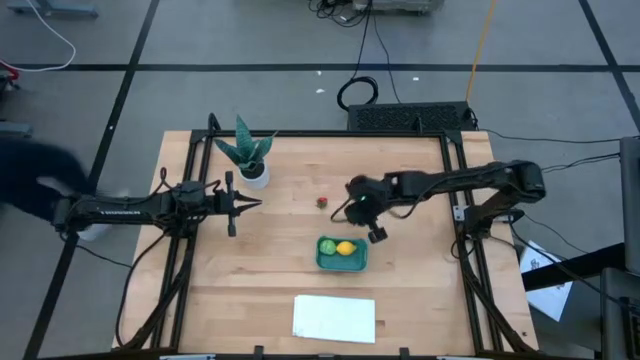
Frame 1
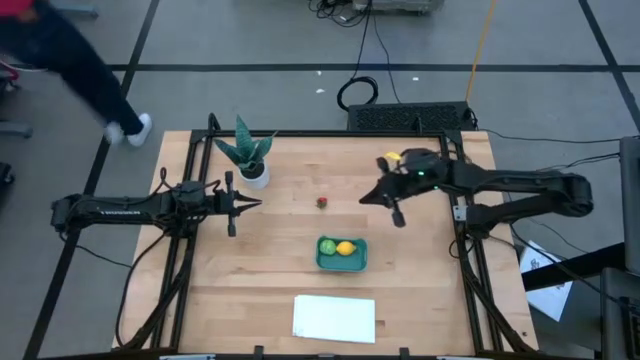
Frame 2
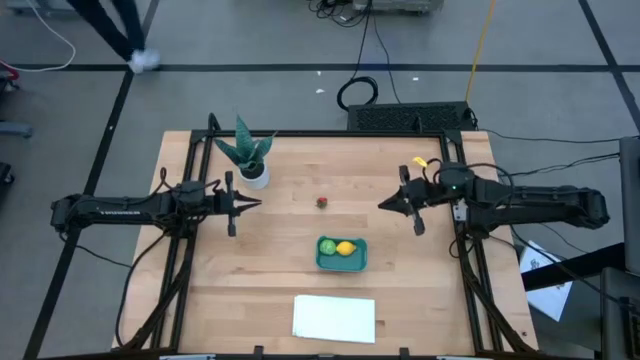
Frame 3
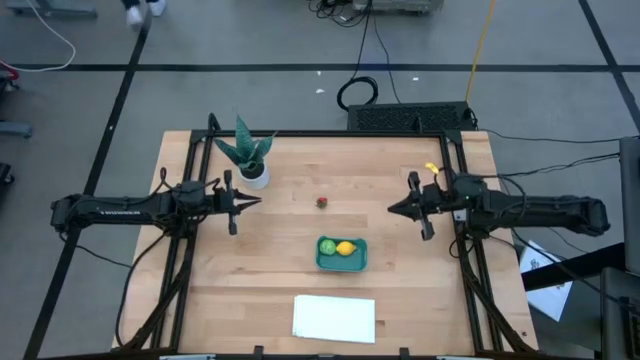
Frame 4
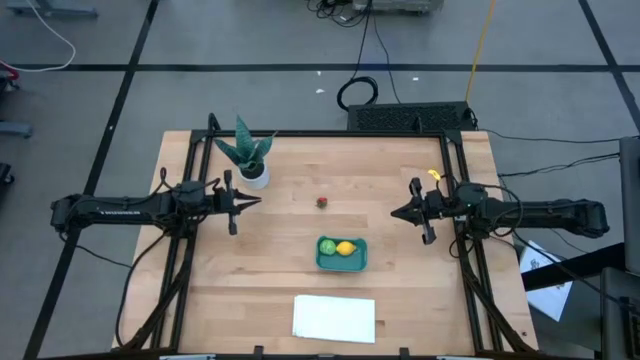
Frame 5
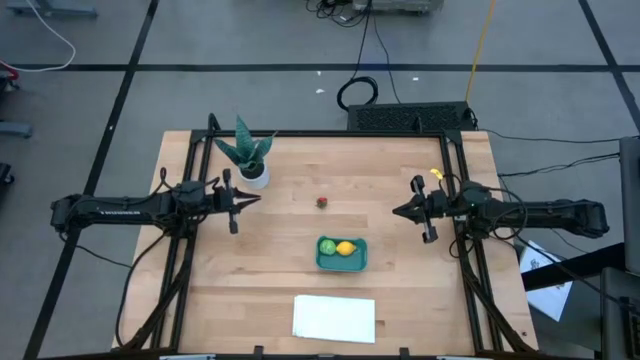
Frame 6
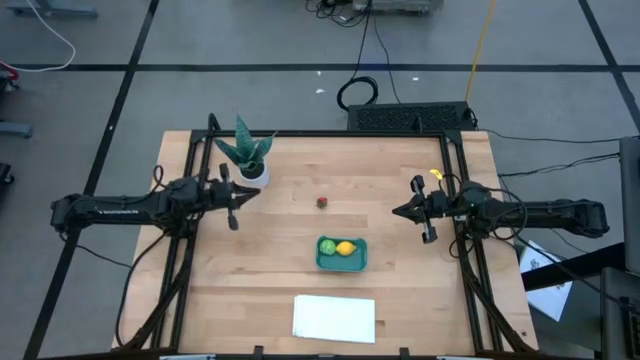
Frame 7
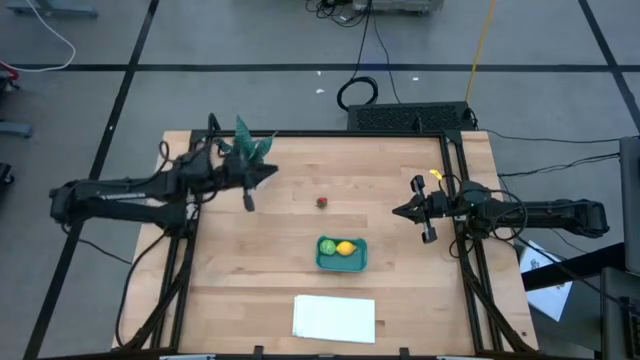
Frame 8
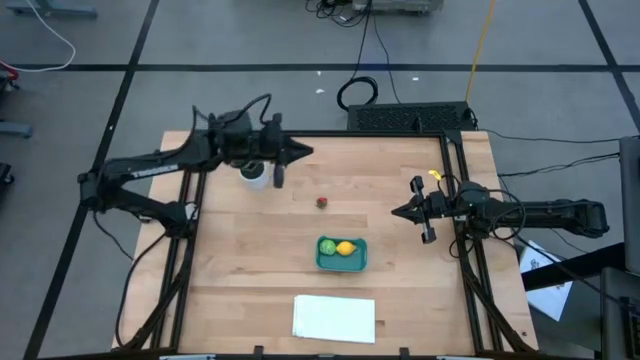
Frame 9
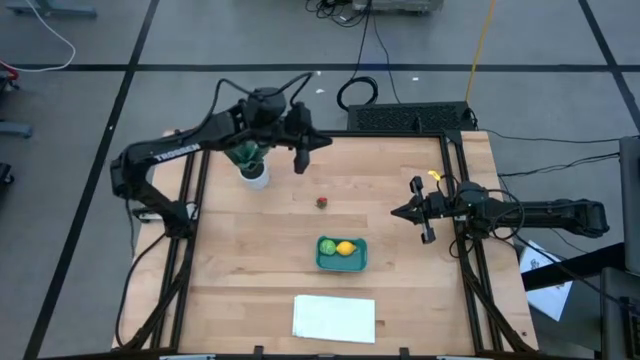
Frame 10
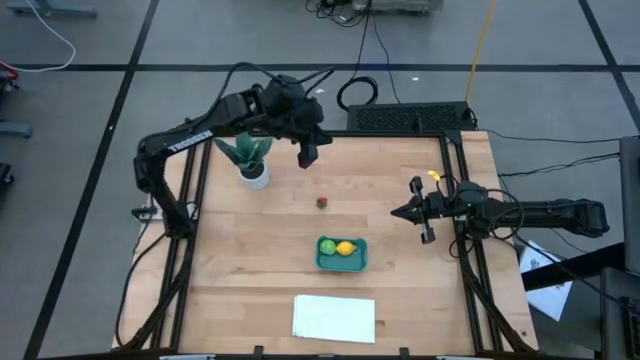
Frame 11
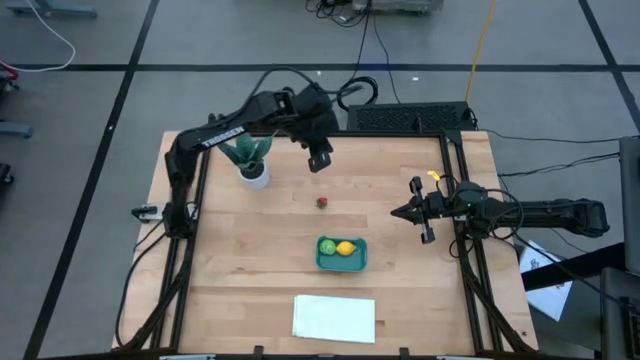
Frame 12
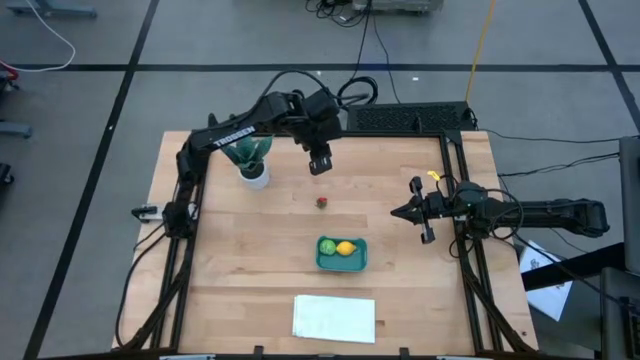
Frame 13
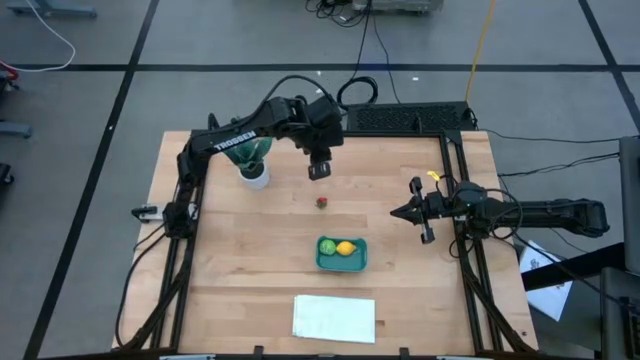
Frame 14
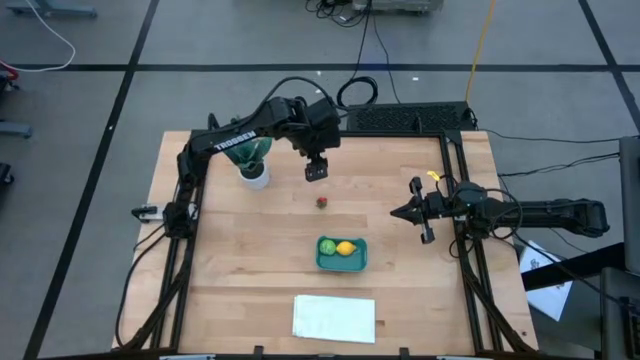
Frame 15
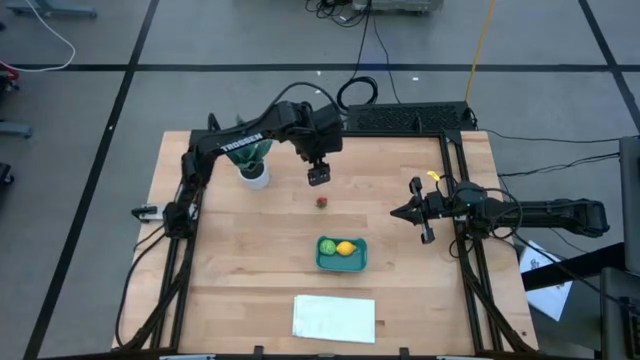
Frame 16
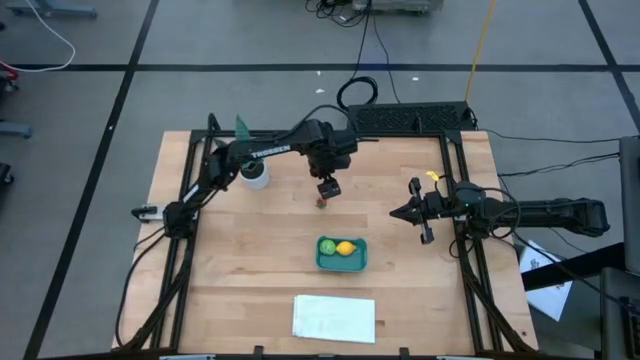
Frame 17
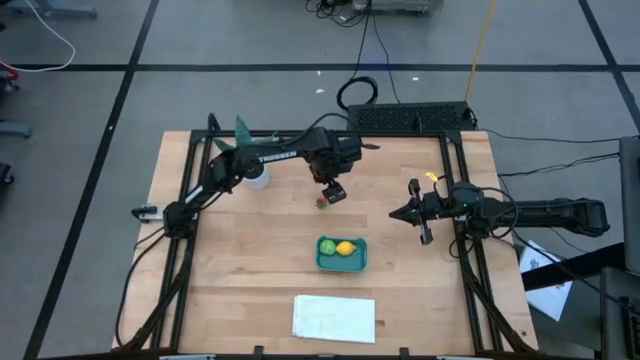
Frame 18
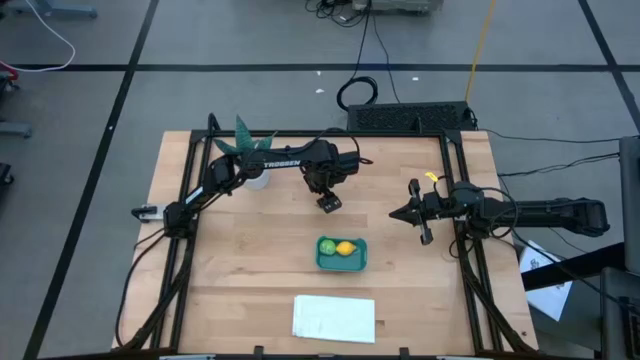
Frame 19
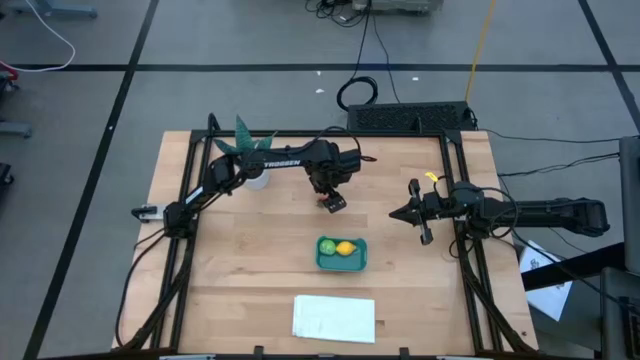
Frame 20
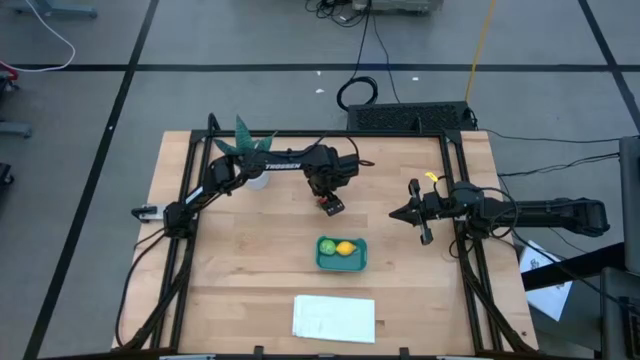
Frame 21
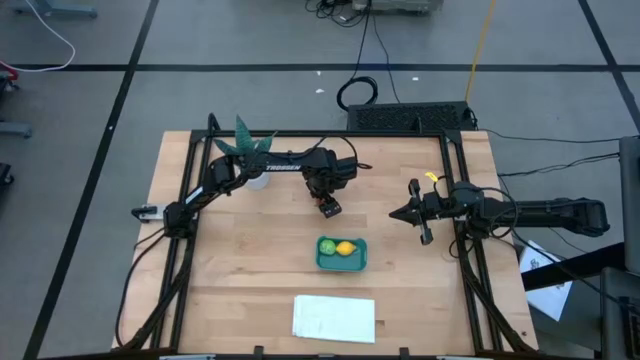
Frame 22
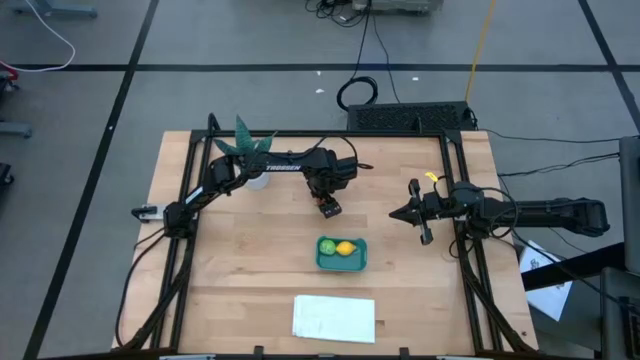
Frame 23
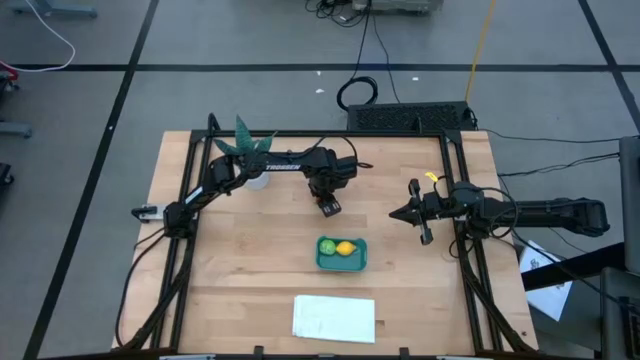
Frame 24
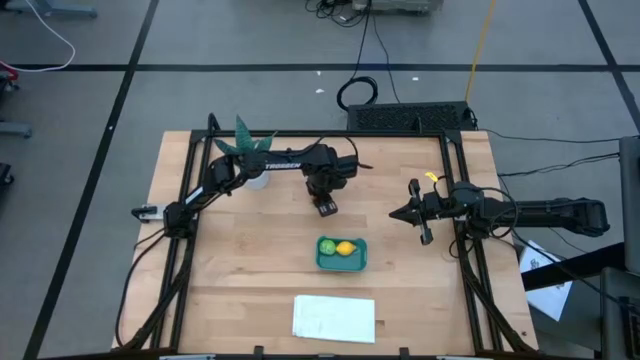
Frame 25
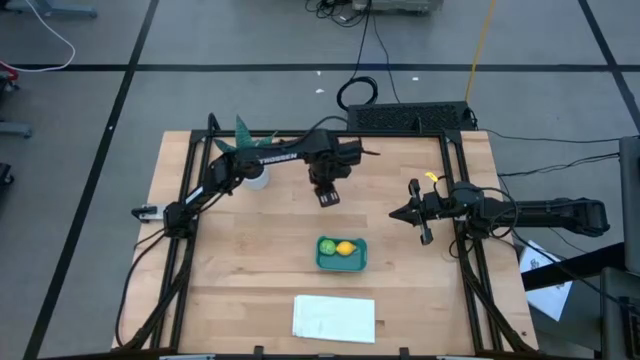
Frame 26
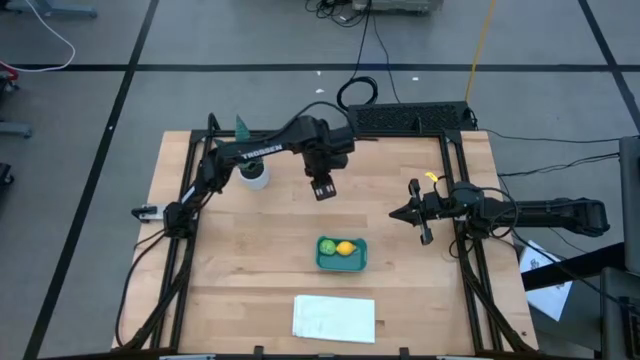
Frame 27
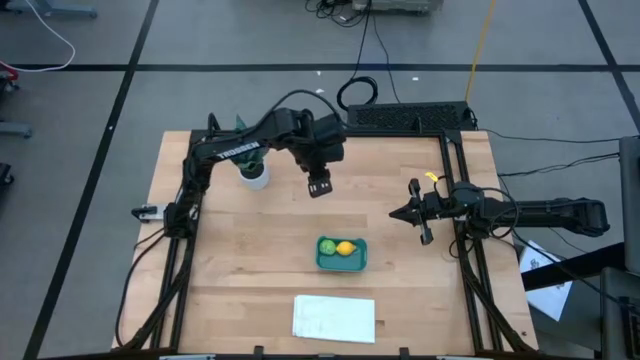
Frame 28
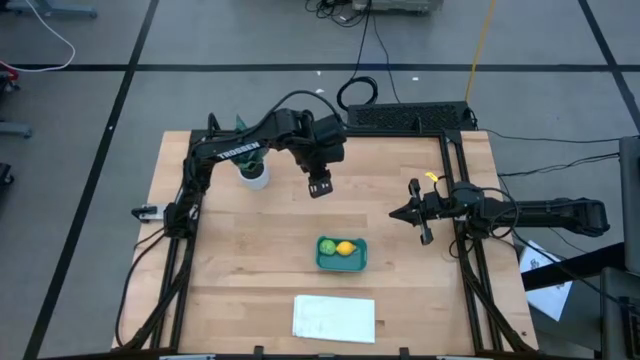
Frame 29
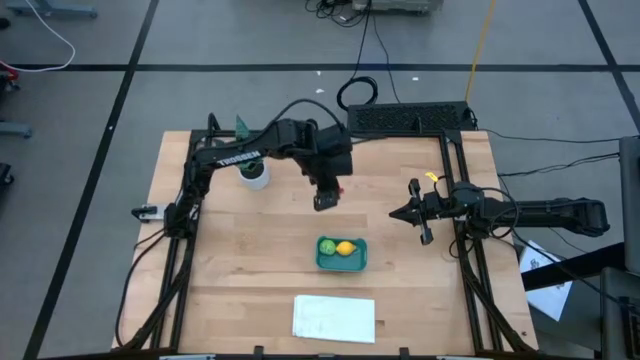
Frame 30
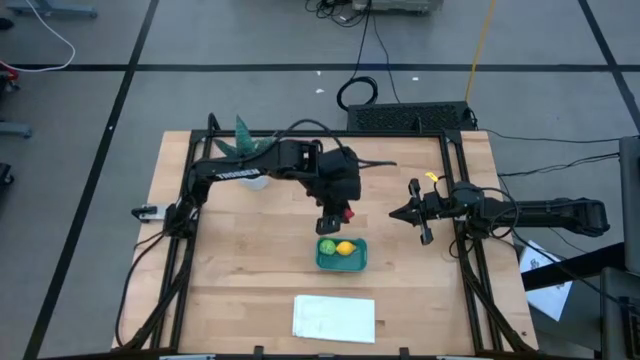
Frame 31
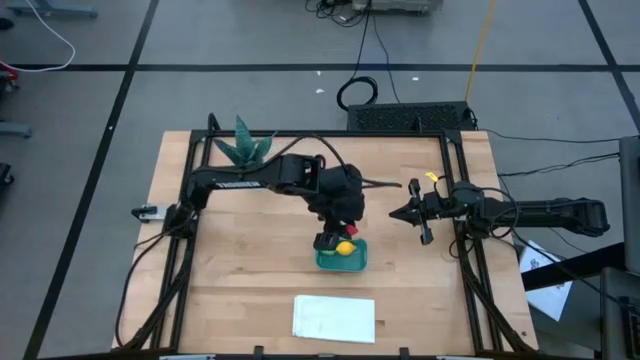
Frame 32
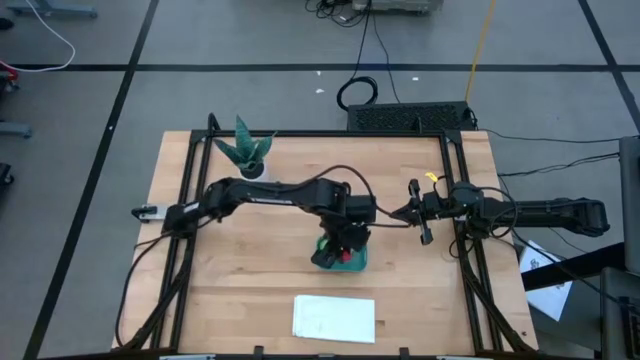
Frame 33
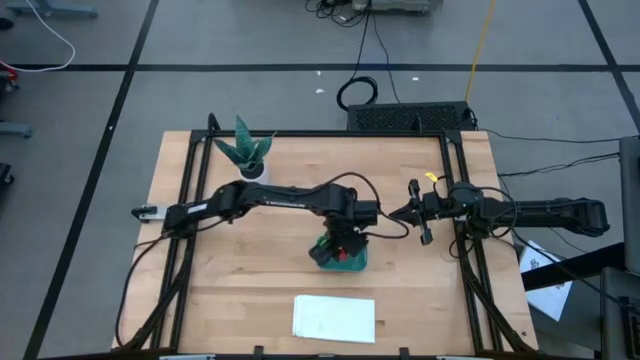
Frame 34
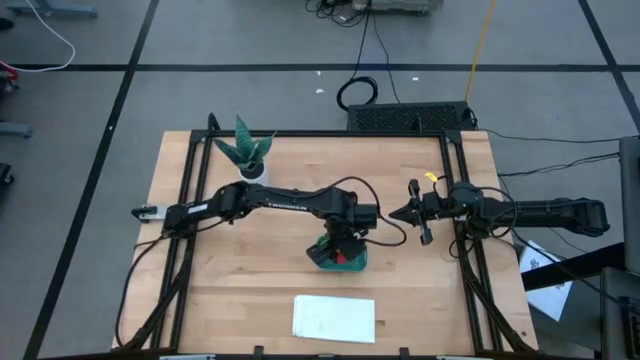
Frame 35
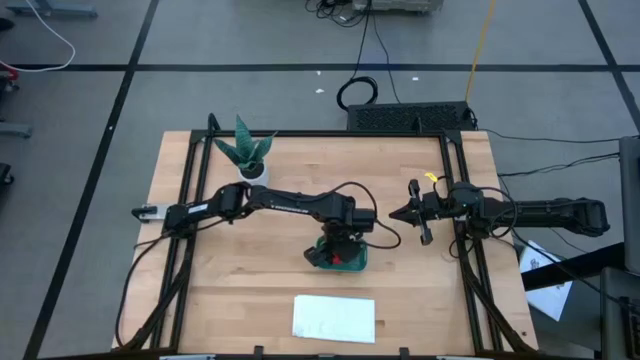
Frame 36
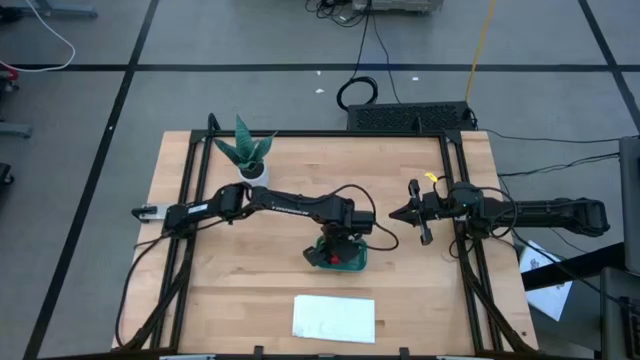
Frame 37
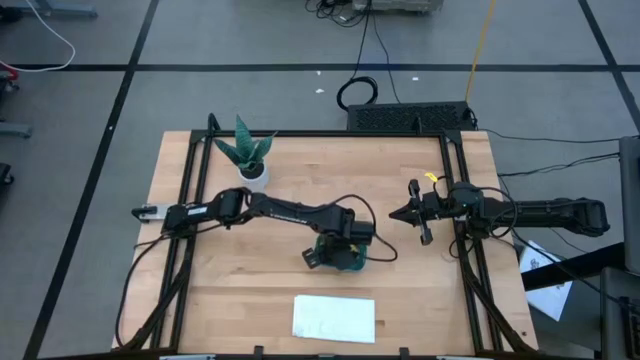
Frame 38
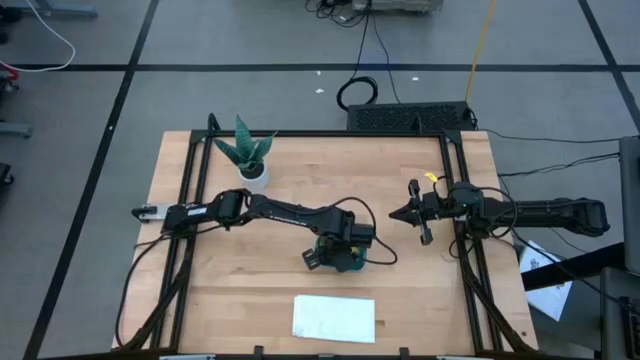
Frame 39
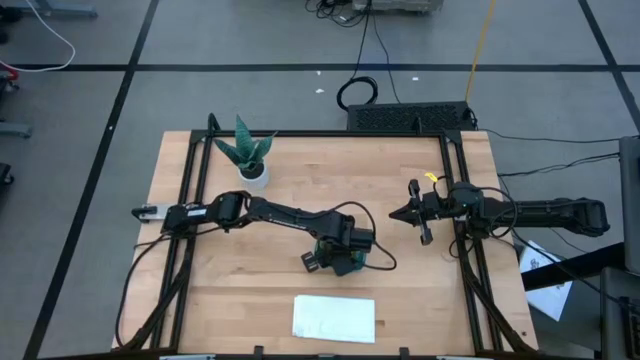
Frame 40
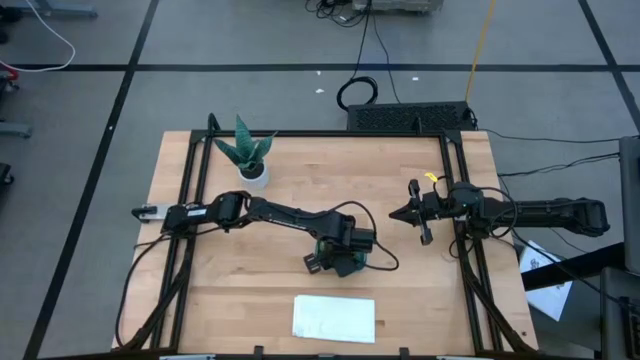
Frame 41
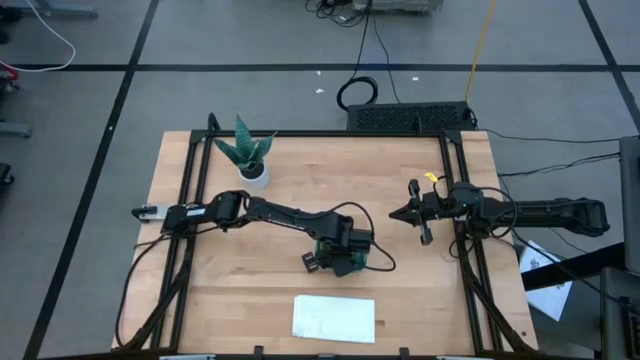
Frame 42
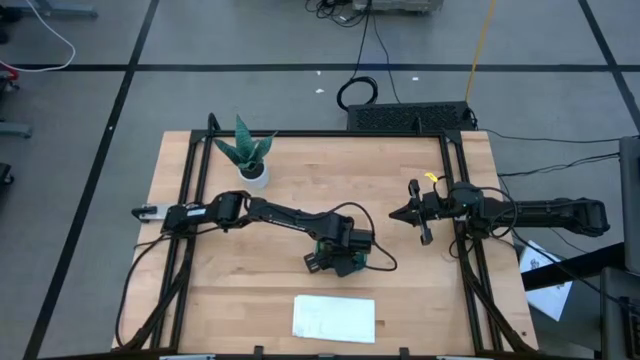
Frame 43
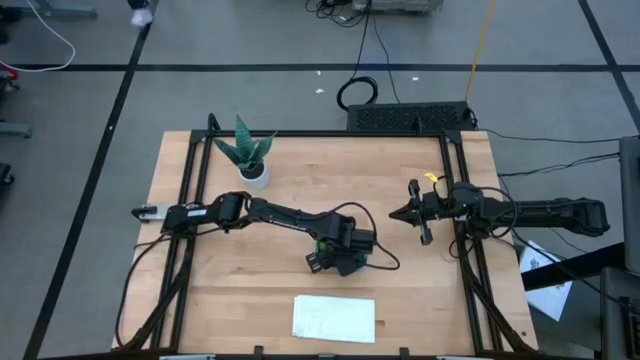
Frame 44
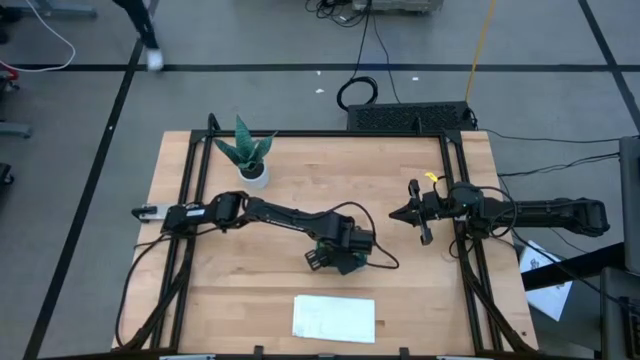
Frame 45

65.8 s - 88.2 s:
Task: Pick and placing Produce into tupperware
Put the strawberry into the blue bin
